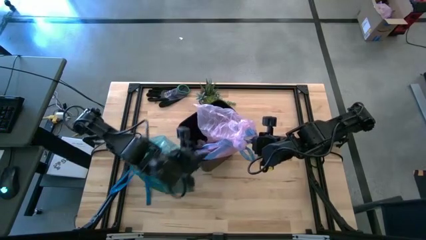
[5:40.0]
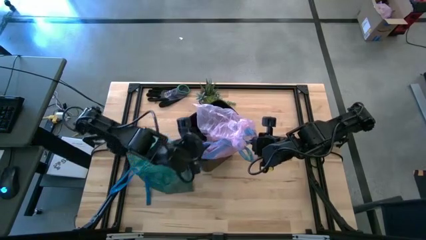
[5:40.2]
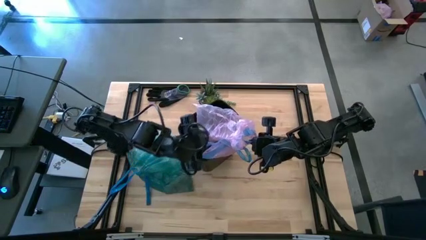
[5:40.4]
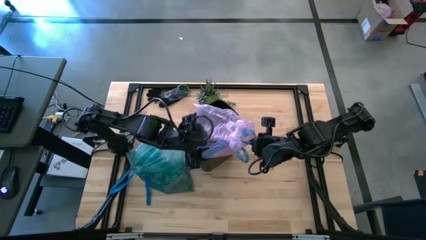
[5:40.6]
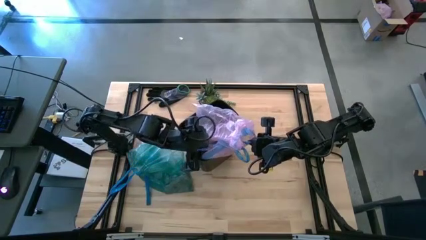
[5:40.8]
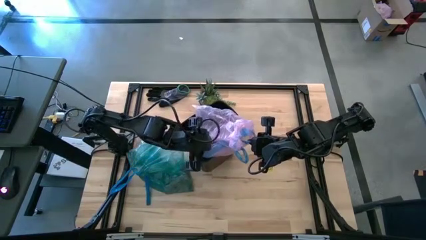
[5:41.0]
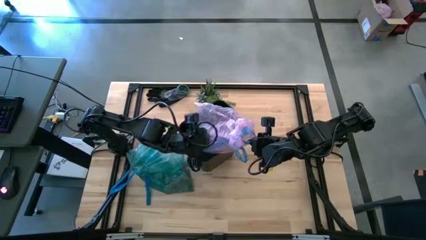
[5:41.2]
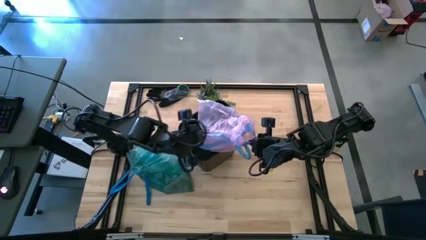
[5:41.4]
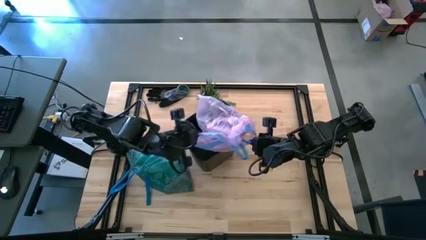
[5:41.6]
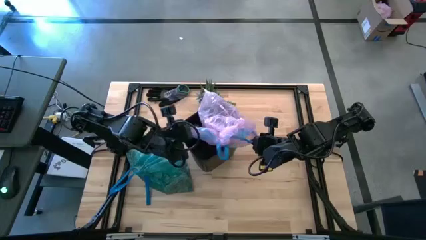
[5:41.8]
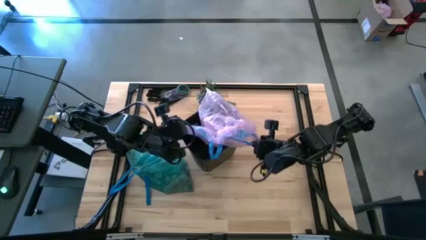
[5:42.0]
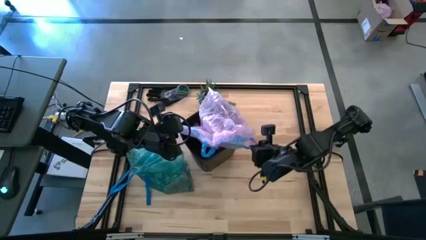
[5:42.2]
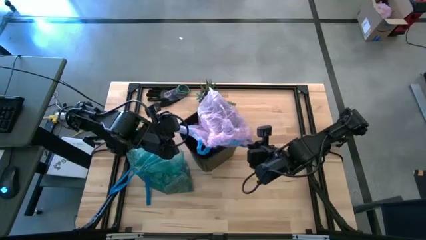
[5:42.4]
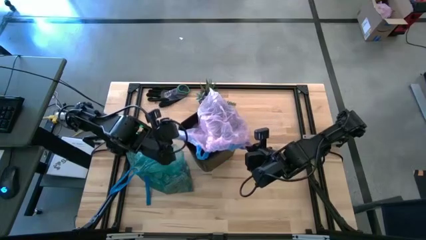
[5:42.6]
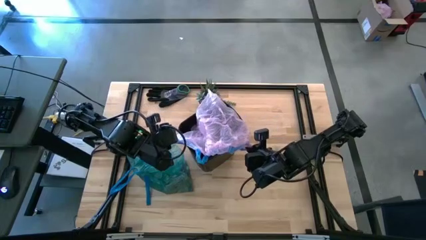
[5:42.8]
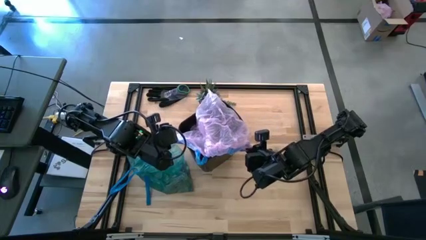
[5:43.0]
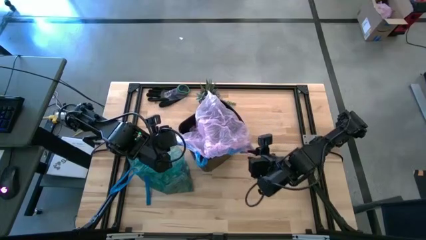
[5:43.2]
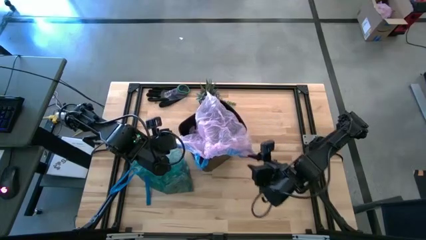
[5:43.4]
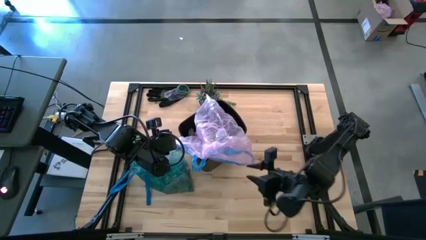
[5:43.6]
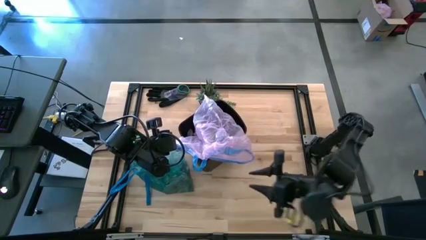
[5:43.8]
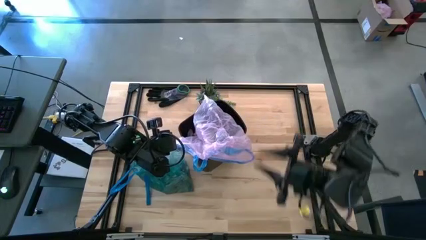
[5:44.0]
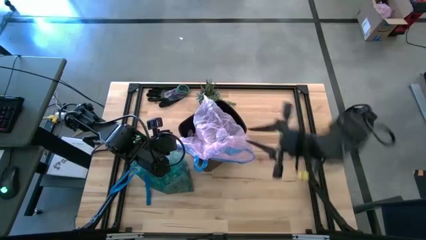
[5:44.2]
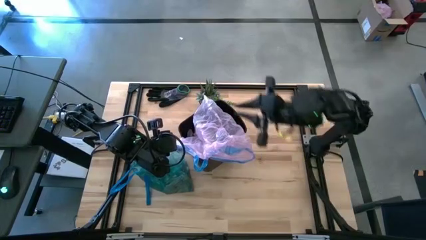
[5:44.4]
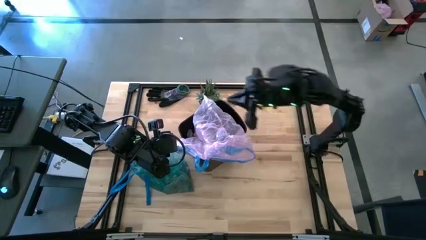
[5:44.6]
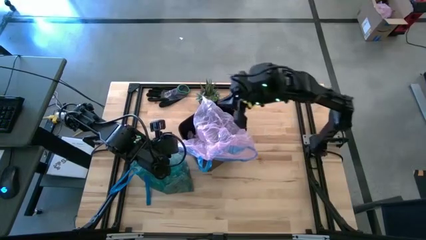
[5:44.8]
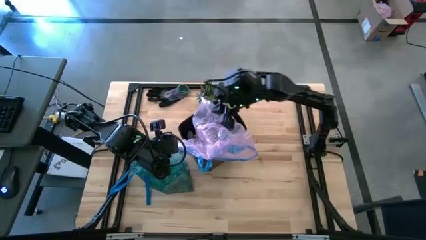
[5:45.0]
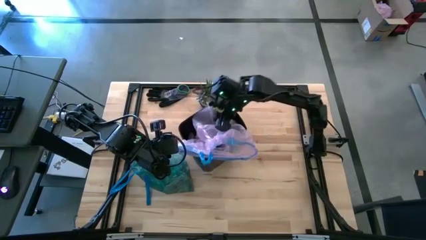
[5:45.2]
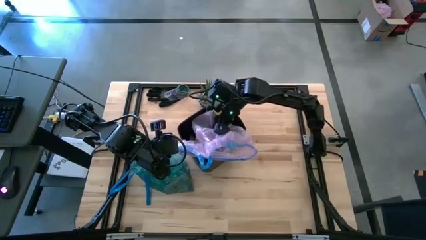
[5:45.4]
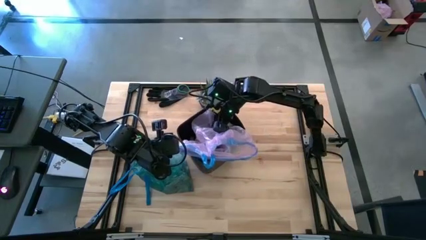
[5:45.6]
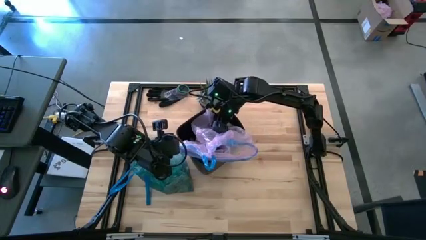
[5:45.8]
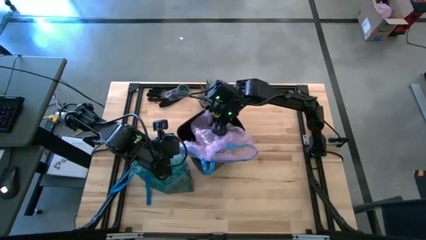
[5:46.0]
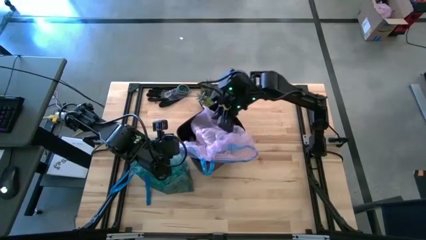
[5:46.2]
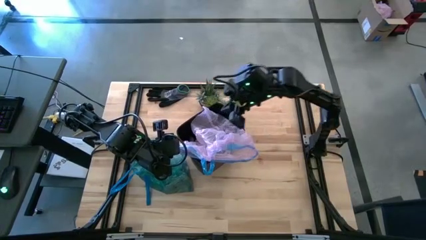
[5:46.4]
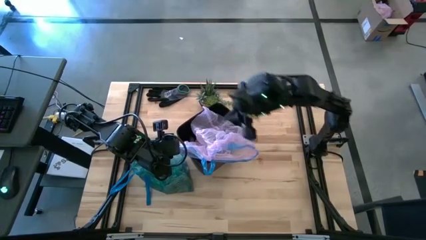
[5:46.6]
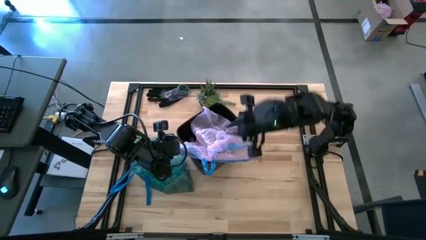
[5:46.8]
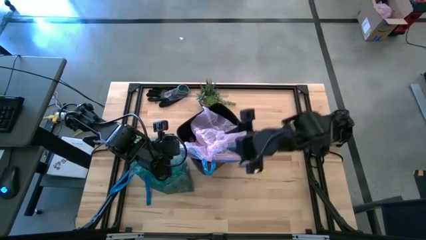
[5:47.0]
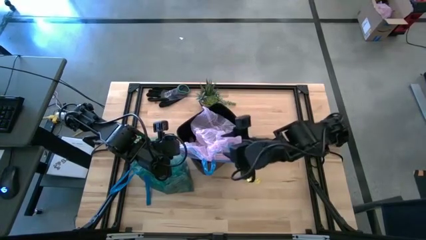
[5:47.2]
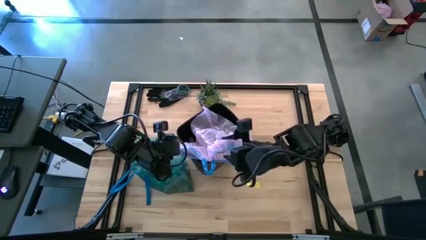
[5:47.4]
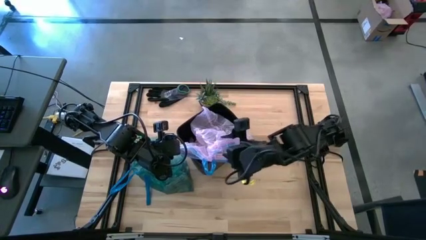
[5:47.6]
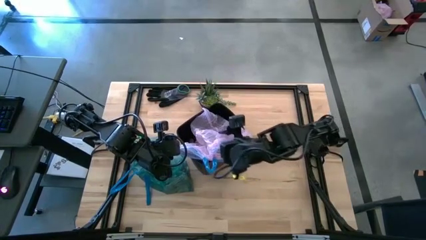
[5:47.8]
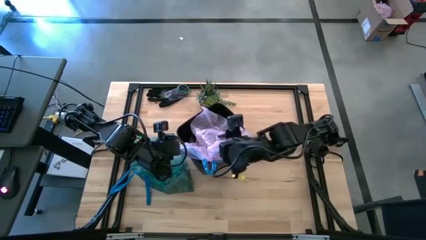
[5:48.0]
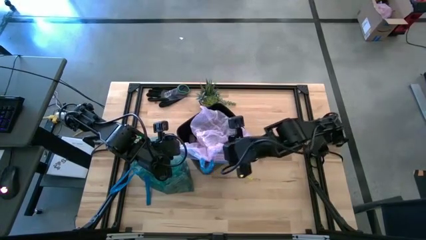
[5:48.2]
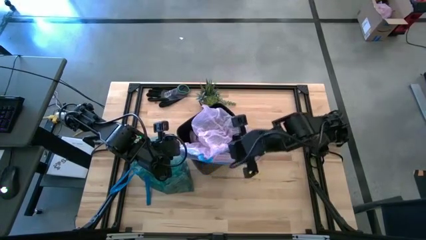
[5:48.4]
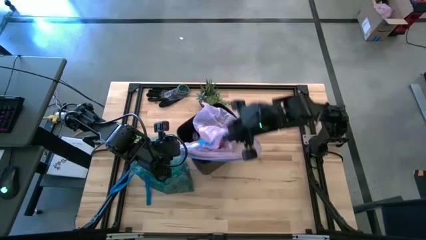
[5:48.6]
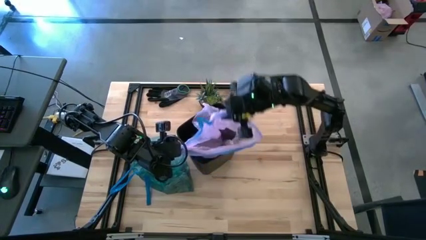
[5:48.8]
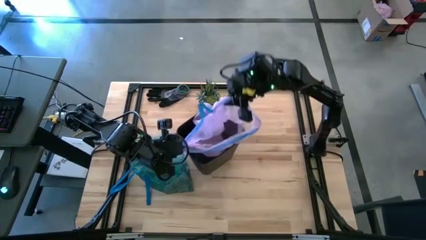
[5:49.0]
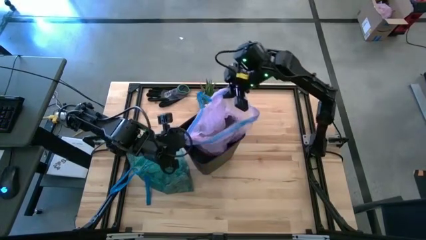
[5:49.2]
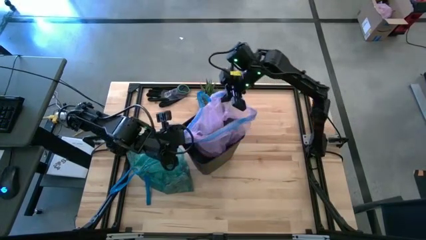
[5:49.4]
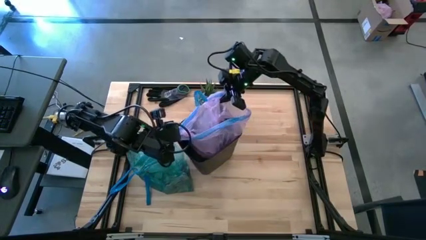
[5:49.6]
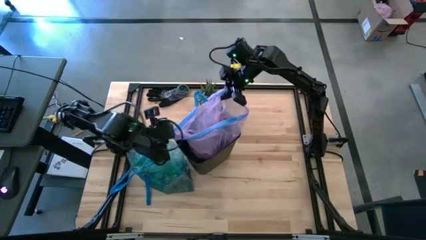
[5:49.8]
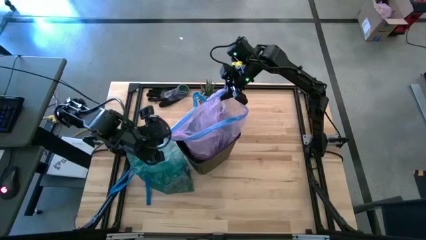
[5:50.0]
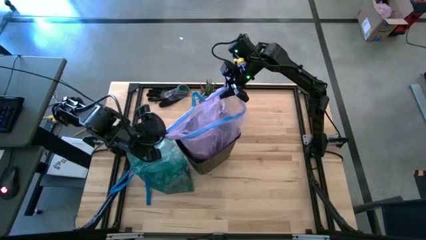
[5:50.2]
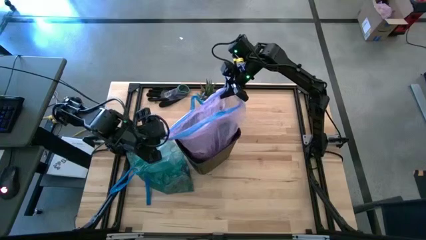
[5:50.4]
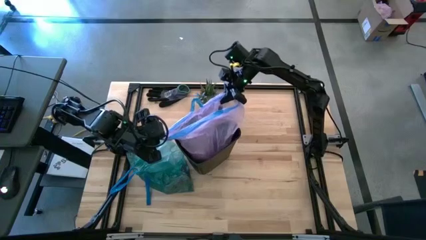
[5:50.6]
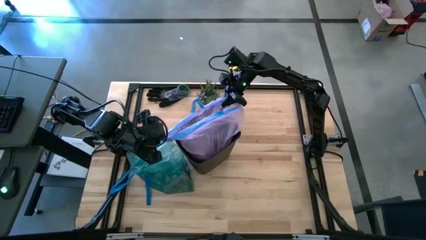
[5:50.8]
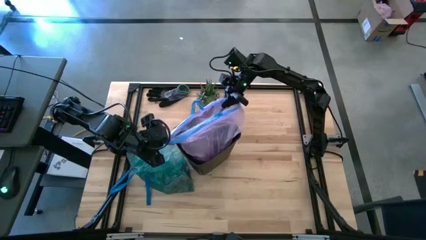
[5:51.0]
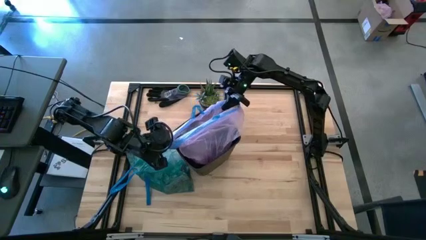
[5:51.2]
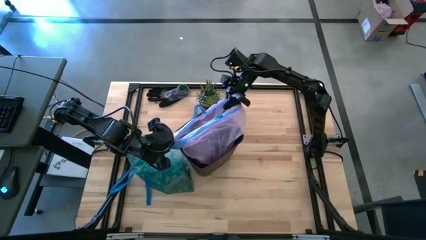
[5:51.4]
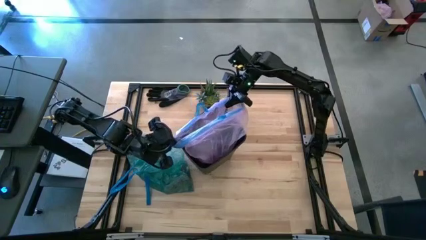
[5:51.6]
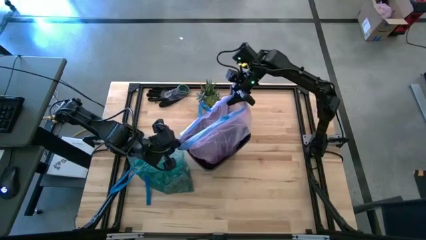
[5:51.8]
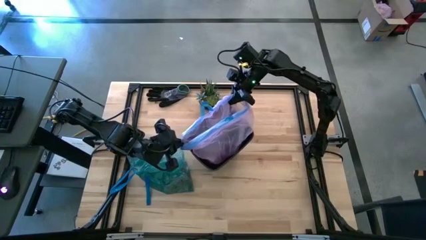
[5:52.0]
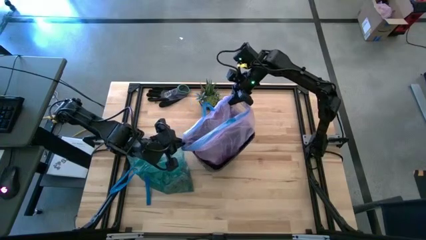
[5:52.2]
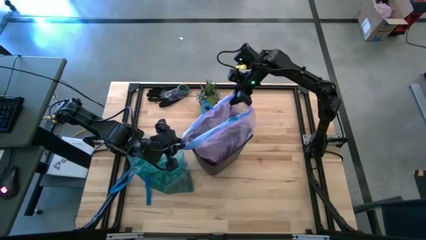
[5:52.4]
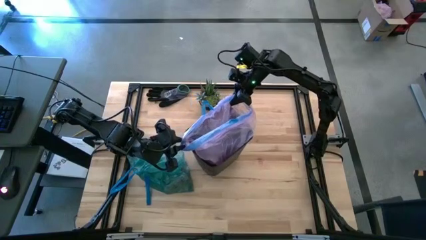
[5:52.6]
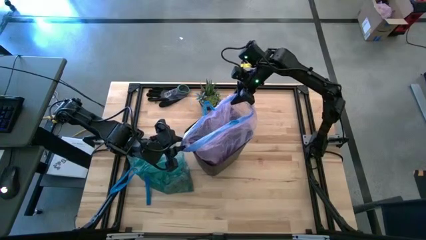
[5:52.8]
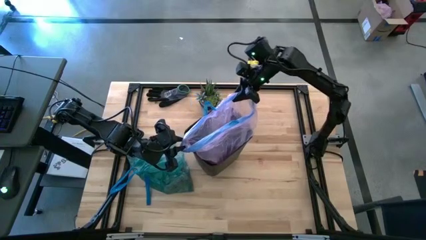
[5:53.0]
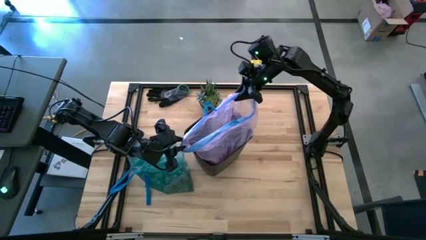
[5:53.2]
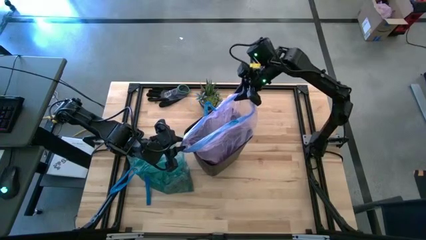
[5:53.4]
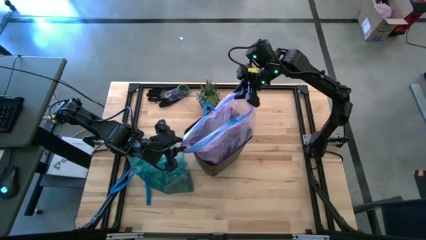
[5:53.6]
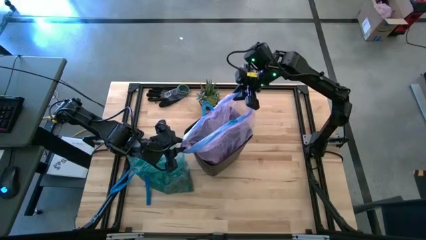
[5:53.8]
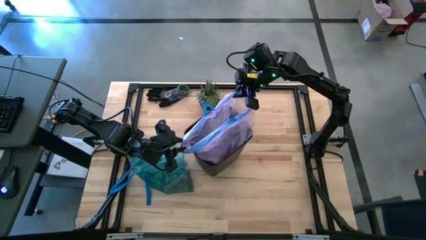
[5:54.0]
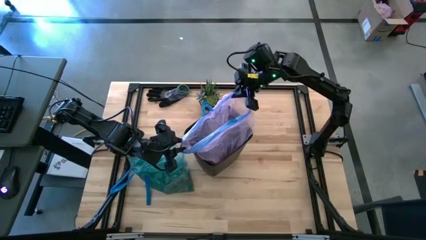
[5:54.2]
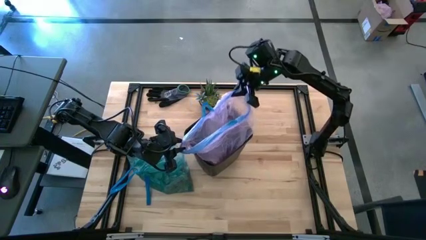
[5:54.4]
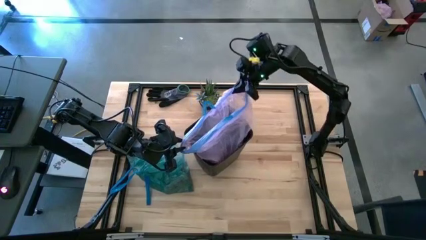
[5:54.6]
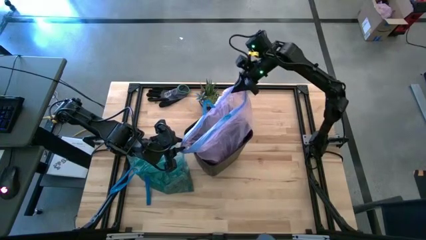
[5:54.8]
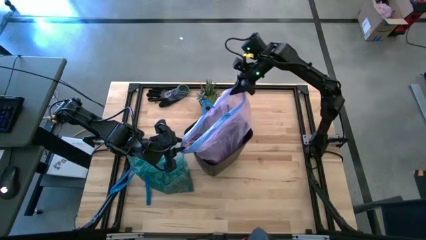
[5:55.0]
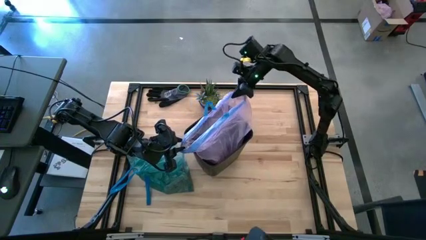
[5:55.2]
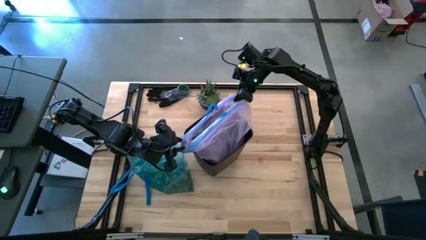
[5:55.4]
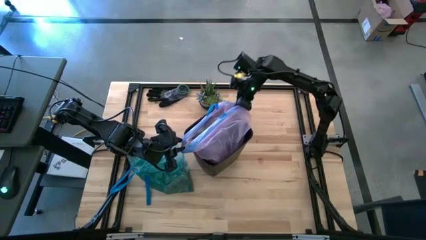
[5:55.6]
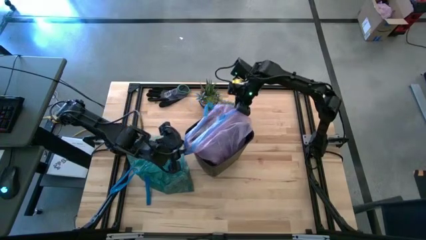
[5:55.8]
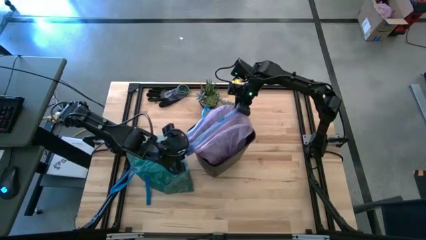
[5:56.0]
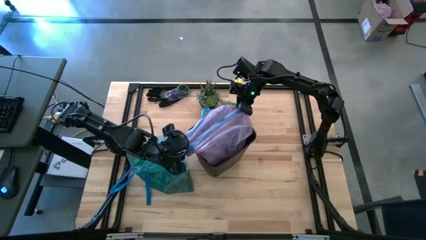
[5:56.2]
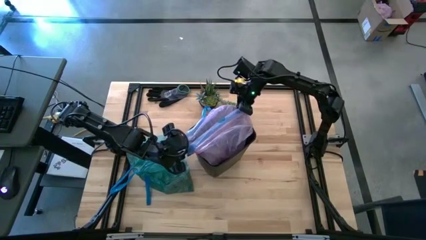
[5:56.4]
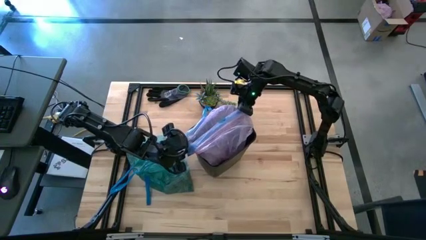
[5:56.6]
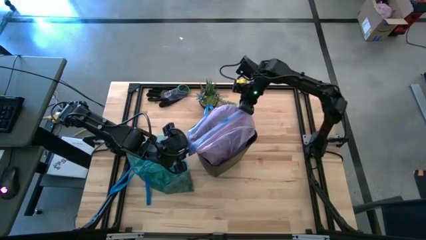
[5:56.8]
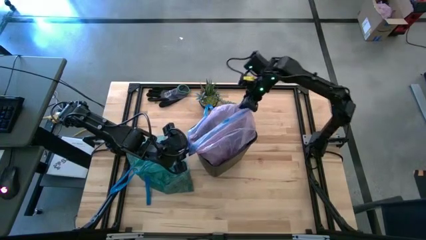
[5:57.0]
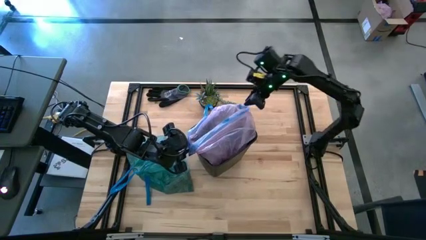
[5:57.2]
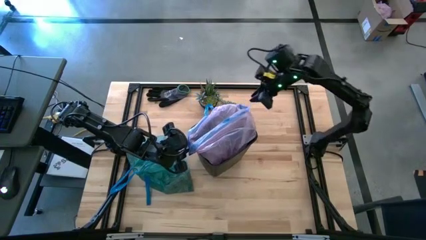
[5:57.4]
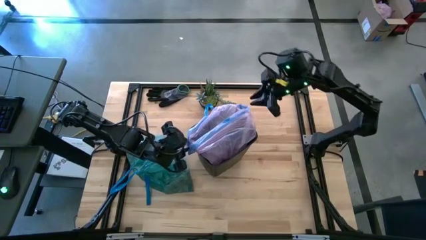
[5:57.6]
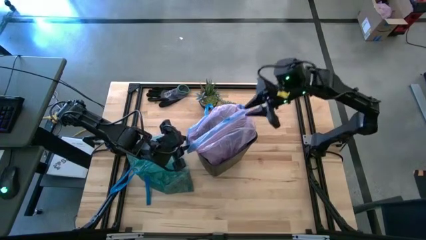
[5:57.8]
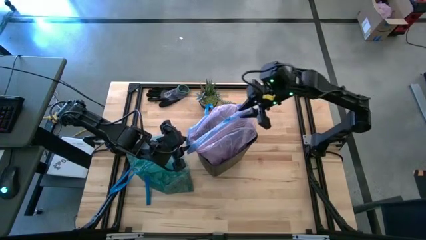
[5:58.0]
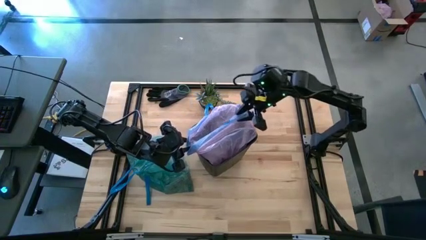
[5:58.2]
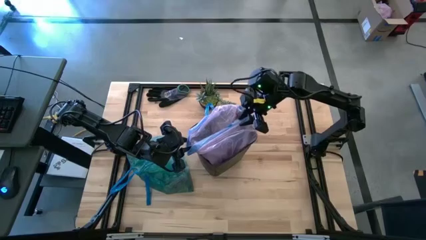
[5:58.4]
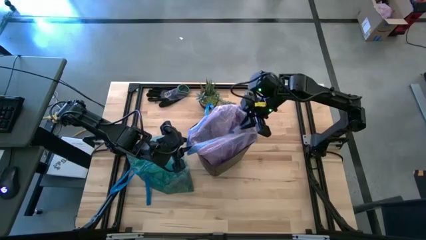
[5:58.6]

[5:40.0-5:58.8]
Task: place trash/remove bag and relplace
Put the pink trash bag into the trash bin
